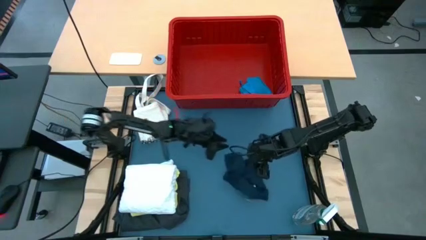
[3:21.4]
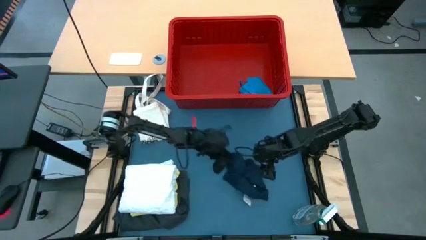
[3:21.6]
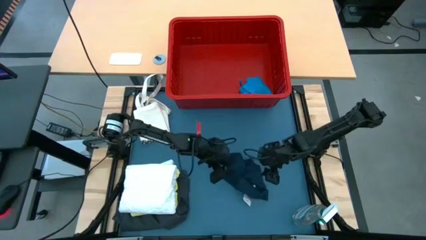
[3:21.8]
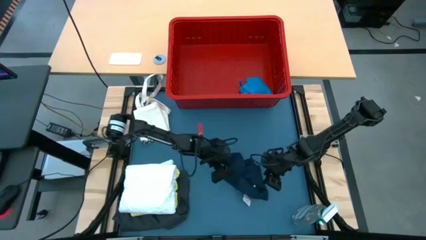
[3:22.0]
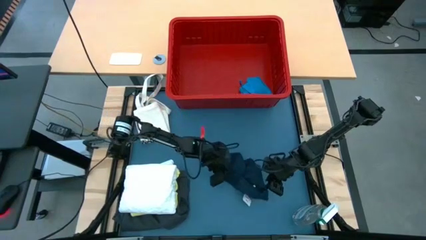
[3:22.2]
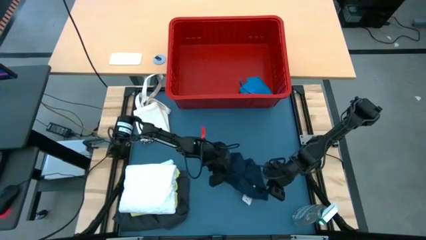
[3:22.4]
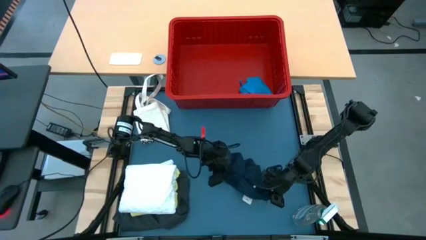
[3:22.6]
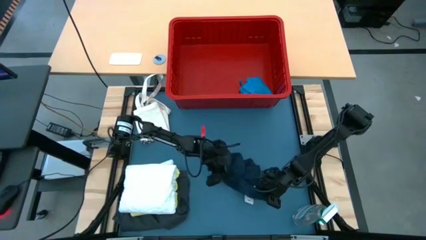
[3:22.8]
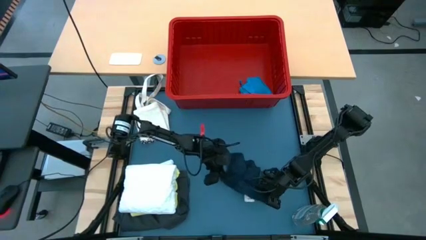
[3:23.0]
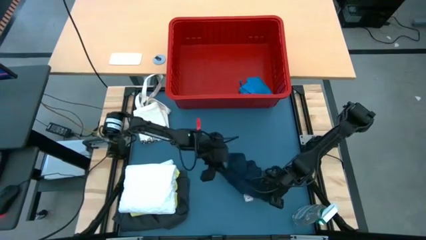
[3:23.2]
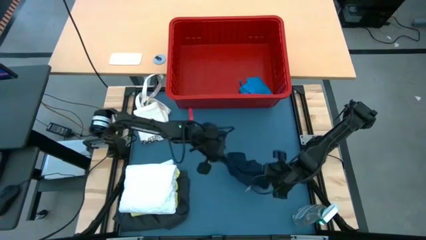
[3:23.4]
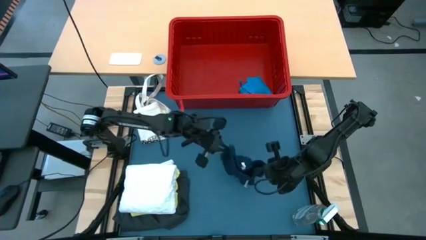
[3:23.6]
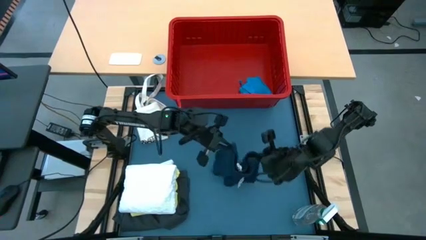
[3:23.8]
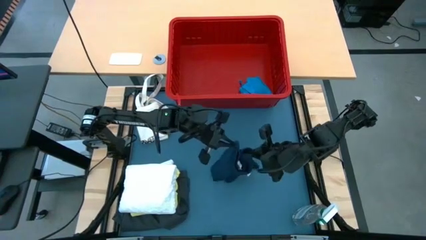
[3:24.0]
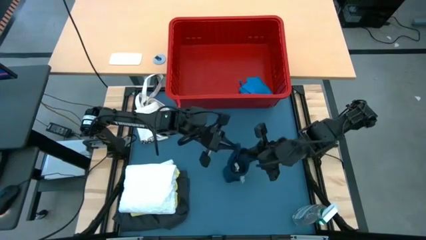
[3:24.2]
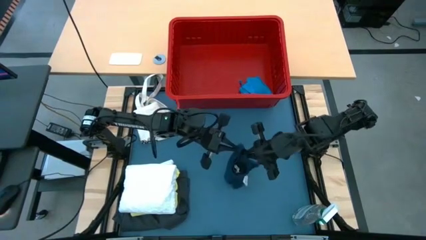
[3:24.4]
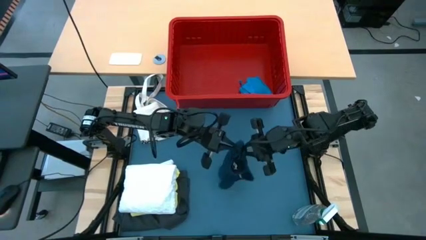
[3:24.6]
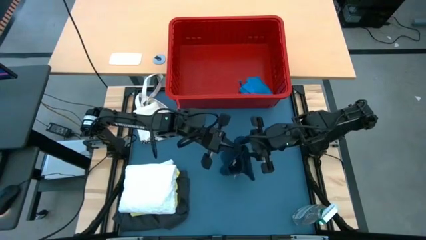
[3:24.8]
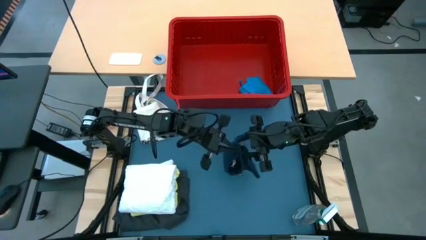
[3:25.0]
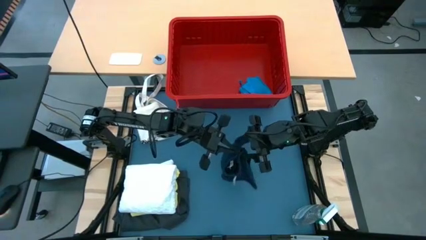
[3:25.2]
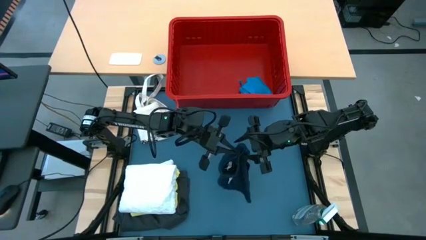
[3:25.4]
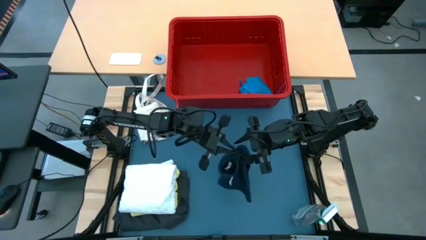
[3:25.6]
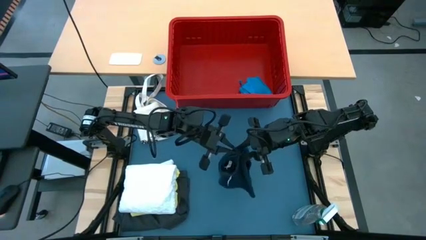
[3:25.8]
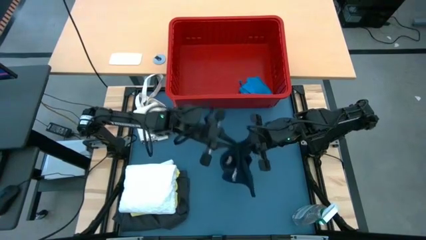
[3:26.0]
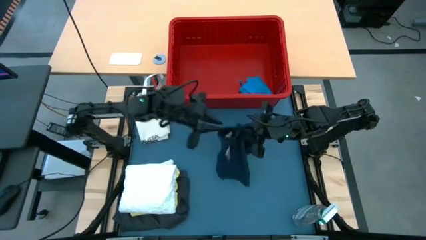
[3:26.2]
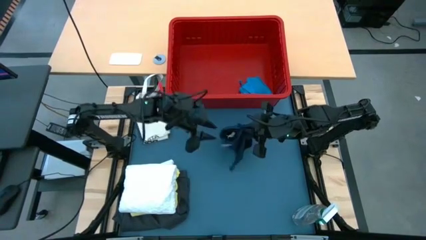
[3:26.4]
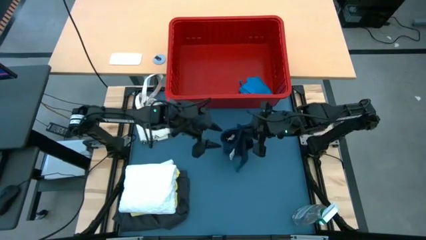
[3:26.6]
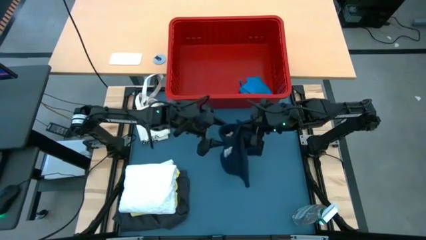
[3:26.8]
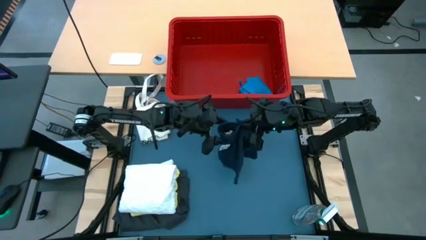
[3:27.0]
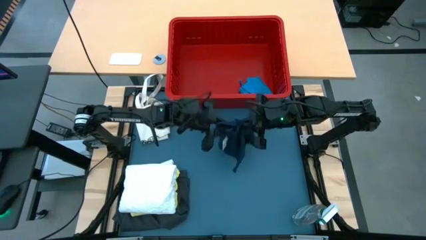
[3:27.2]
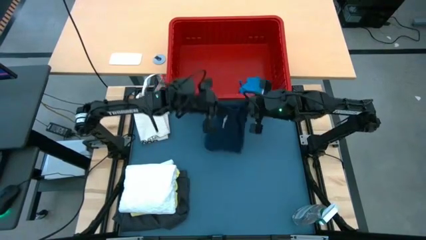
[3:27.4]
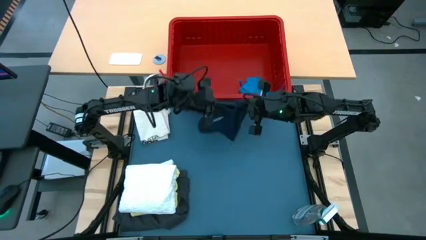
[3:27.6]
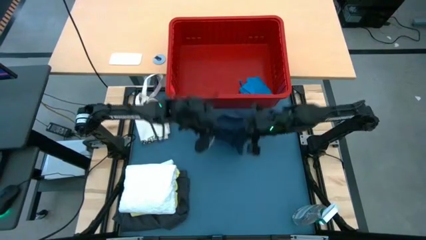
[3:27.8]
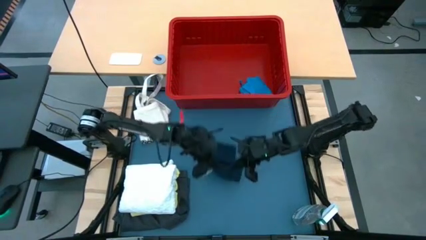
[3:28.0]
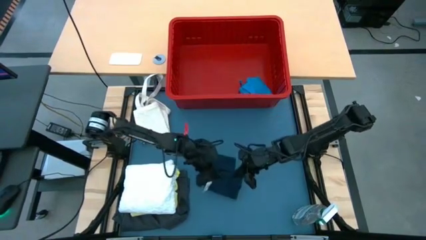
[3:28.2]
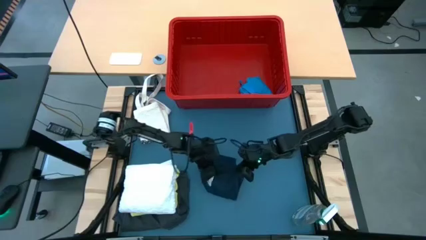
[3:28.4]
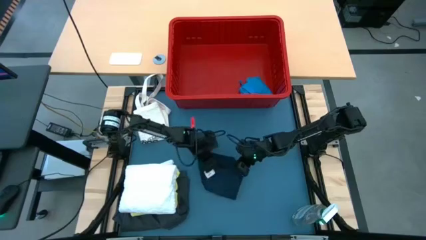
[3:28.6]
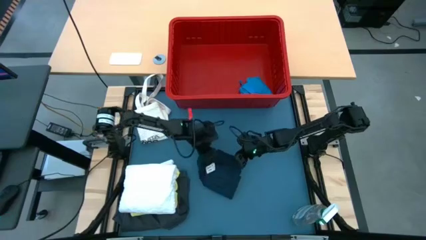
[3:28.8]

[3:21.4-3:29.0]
Task: Fold laundry
Fold the black shorts

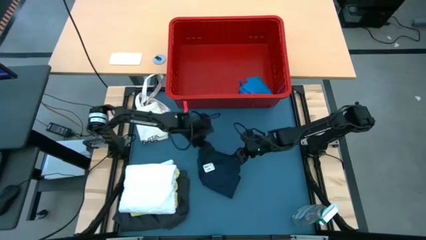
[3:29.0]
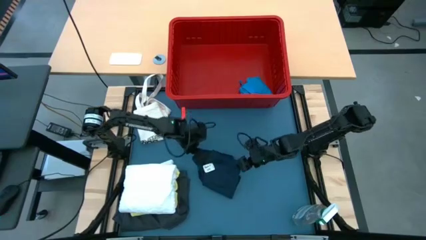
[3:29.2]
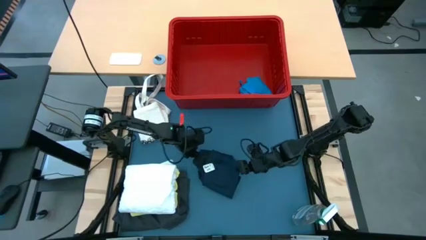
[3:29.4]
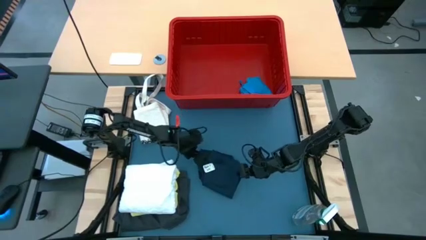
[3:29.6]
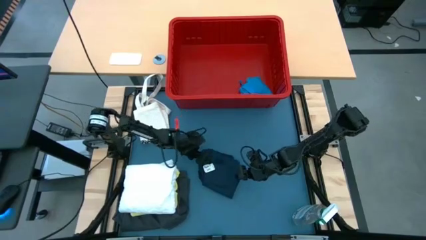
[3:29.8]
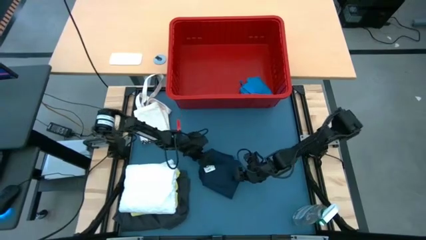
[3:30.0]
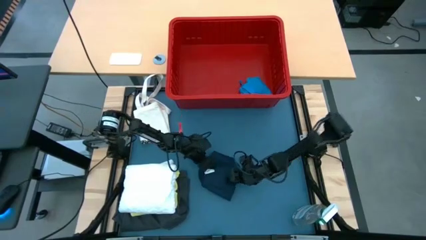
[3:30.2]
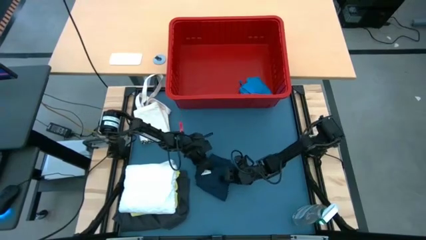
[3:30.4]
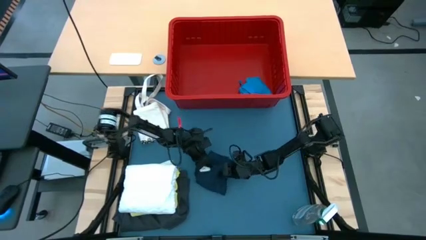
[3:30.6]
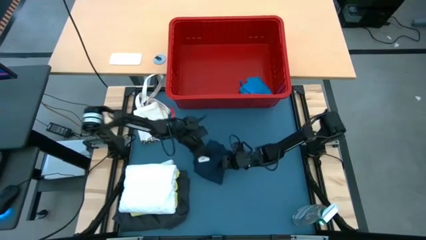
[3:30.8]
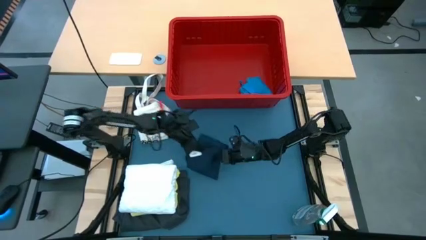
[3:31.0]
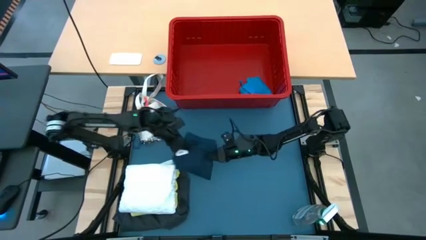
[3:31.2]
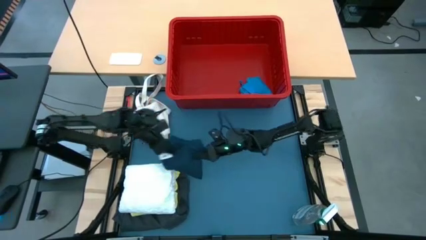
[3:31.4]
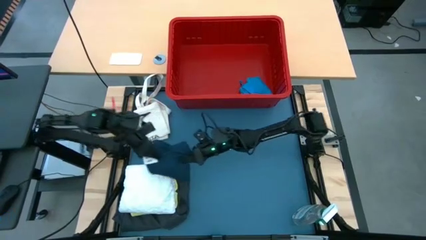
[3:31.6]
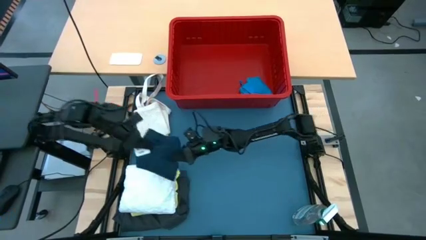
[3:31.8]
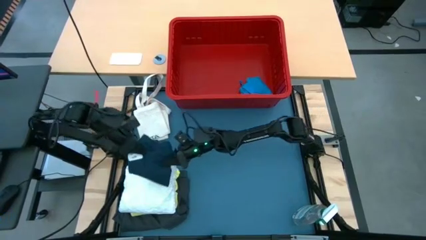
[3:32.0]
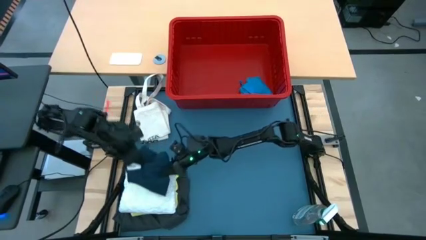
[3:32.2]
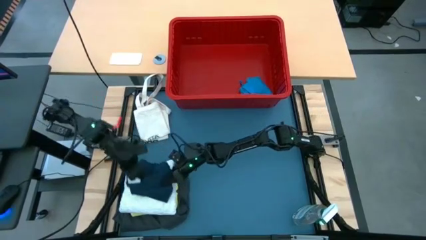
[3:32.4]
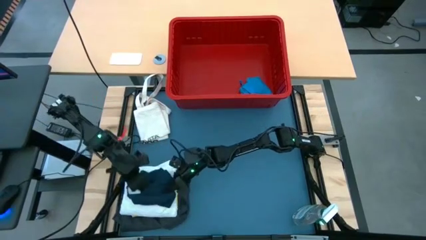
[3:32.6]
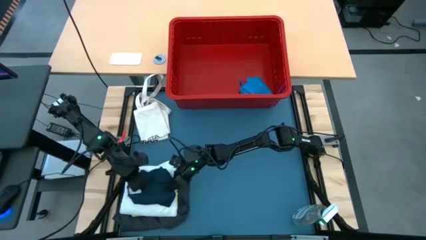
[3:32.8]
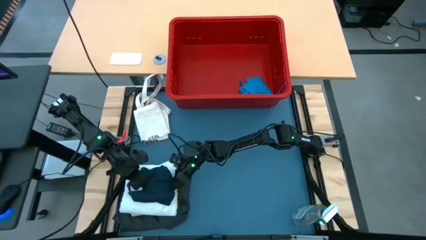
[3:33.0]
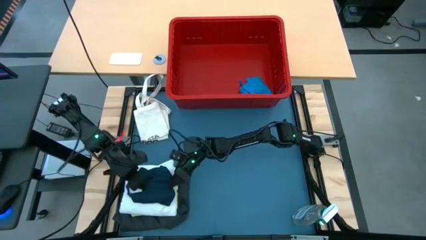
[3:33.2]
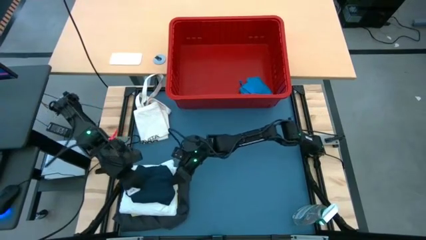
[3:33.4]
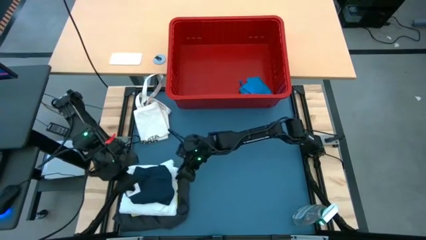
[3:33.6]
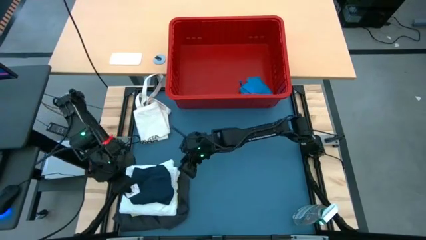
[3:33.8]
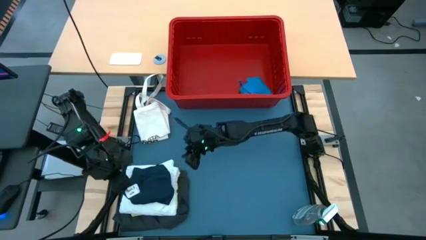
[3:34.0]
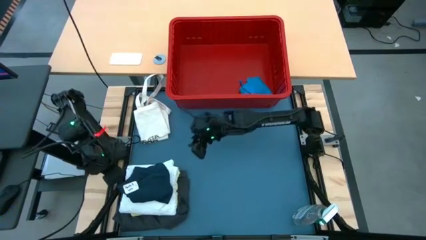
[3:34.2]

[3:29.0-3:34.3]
Stack the black shorts on top of the white blouse

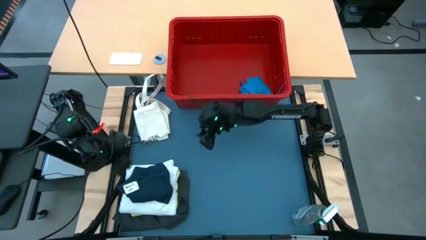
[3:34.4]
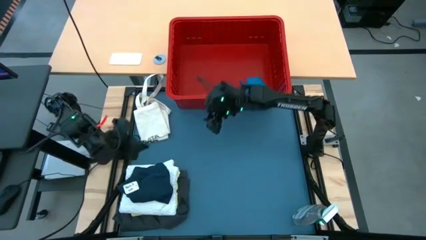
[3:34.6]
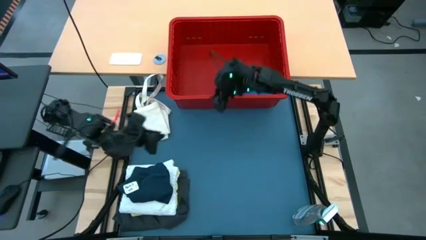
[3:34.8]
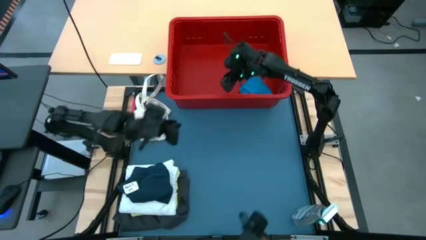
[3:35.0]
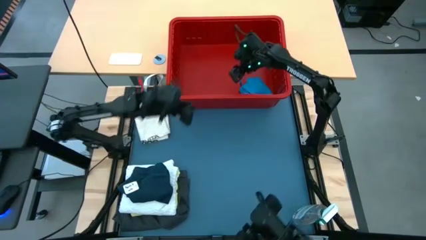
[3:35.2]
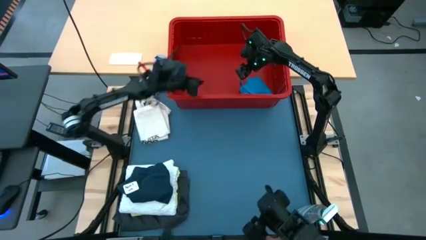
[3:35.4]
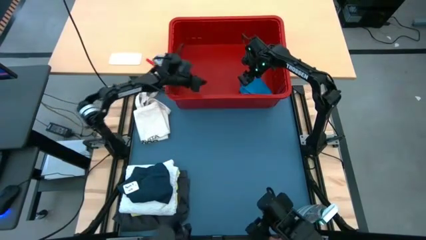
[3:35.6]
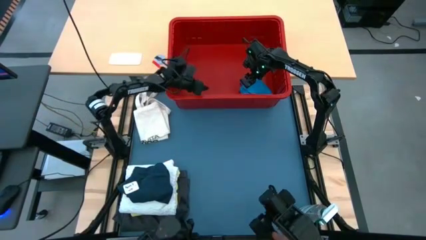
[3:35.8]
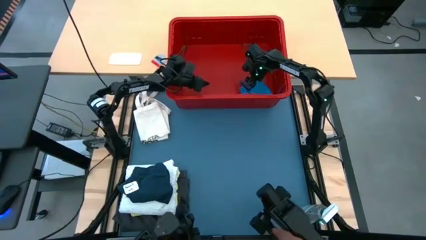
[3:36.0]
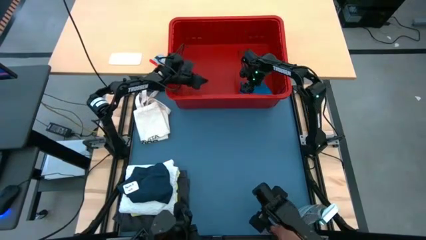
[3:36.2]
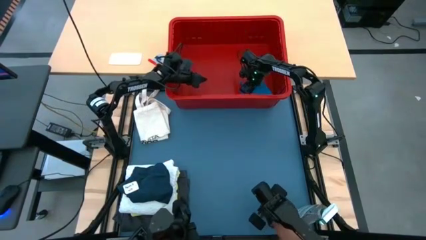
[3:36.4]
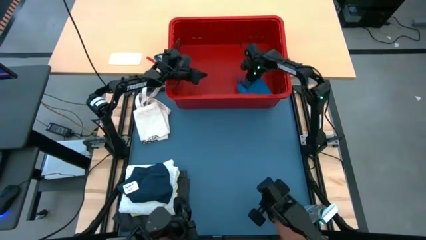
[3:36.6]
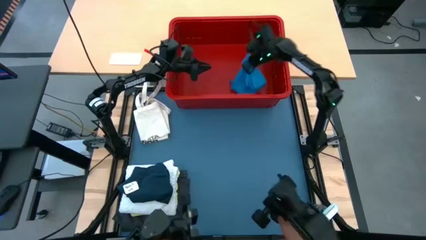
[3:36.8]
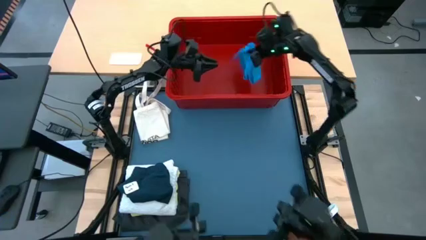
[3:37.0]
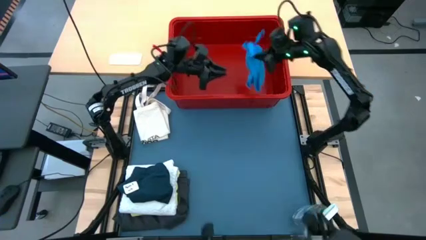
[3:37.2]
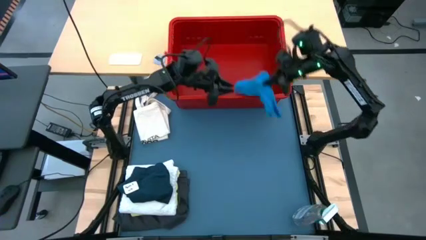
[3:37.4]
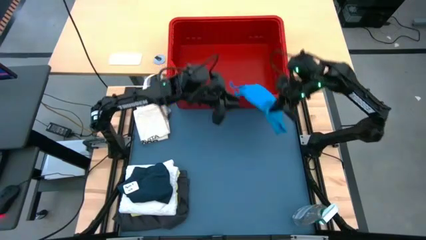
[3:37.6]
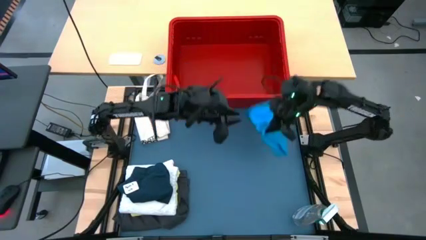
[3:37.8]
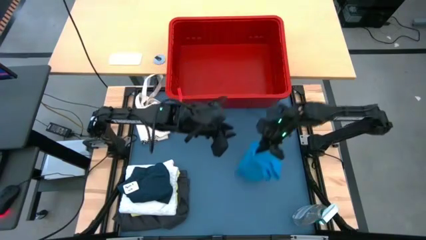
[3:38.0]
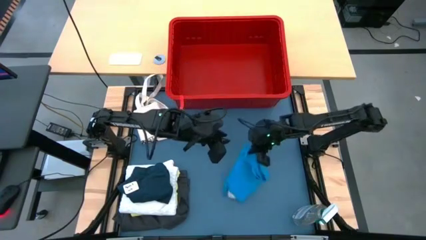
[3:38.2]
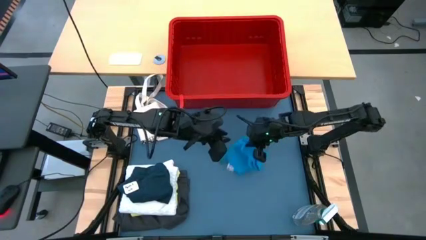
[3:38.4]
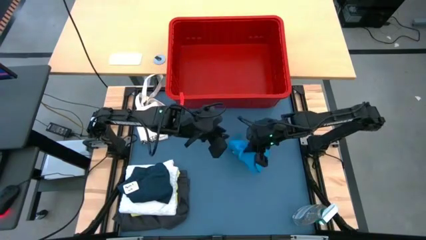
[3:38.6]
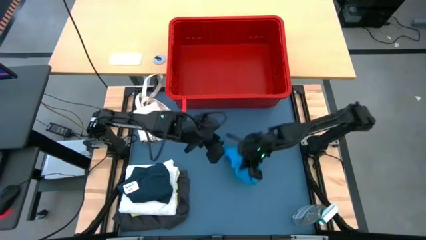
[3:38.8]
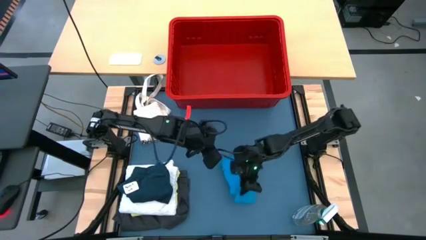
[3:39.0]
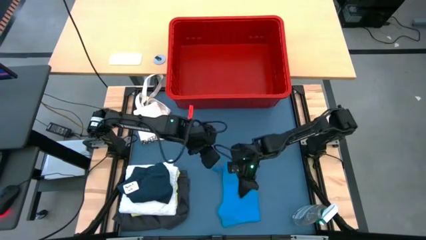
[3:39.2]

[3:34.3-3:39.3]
Remove the blue shorts from the bin
